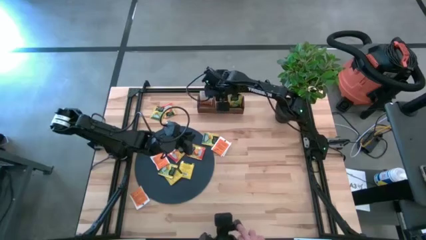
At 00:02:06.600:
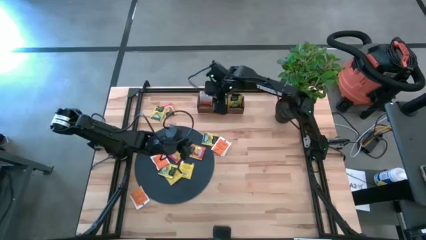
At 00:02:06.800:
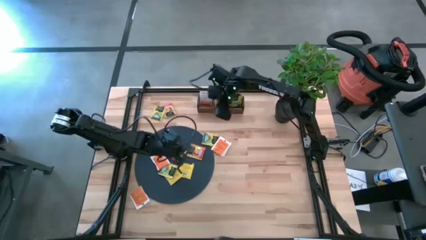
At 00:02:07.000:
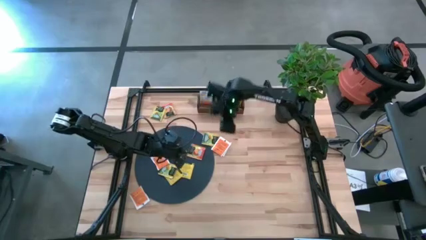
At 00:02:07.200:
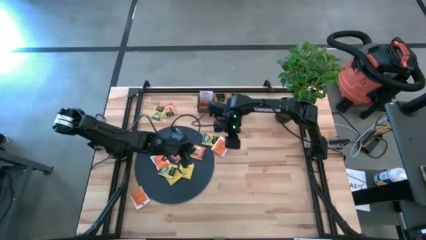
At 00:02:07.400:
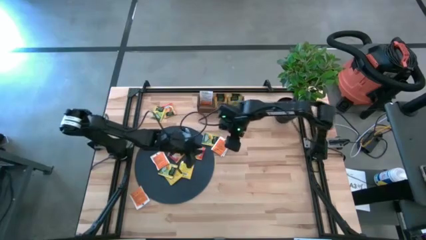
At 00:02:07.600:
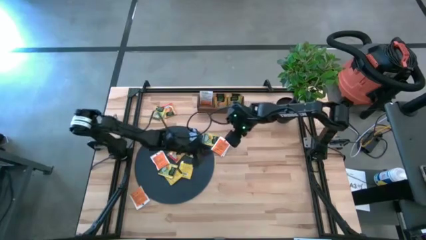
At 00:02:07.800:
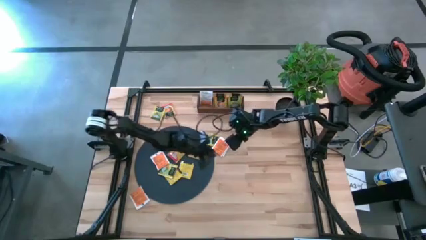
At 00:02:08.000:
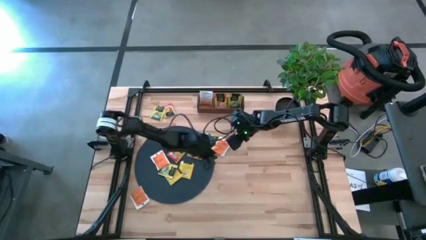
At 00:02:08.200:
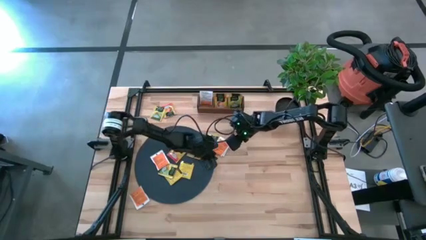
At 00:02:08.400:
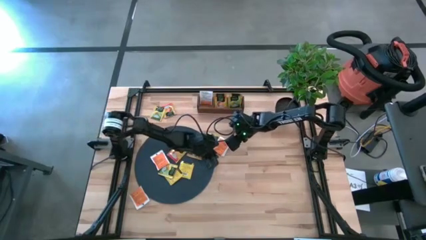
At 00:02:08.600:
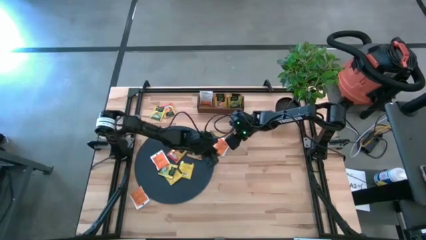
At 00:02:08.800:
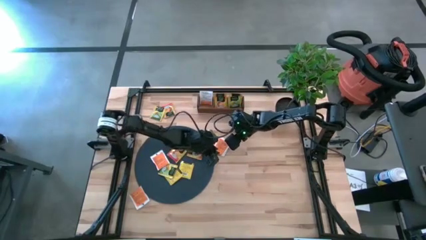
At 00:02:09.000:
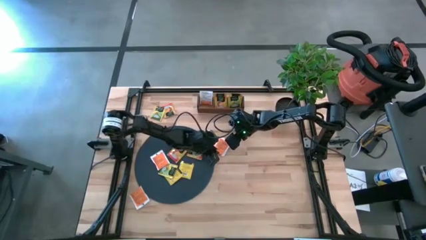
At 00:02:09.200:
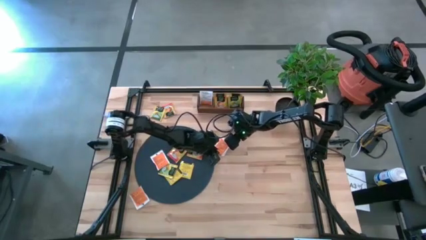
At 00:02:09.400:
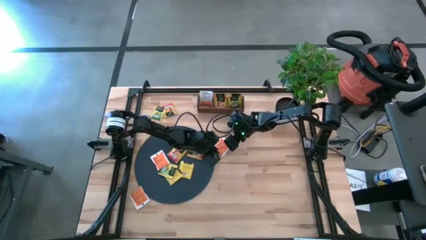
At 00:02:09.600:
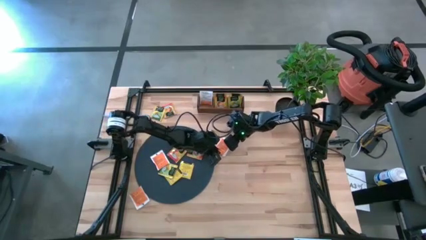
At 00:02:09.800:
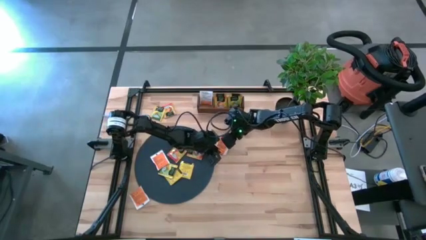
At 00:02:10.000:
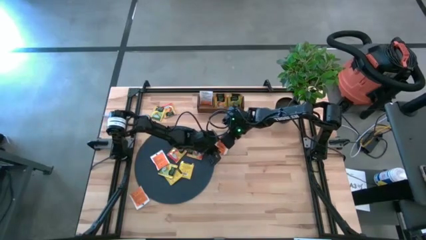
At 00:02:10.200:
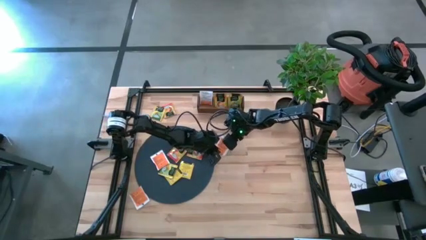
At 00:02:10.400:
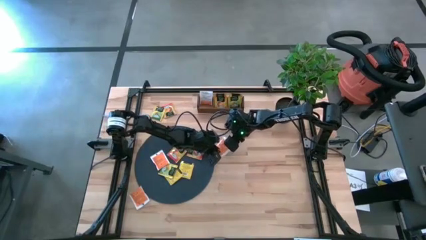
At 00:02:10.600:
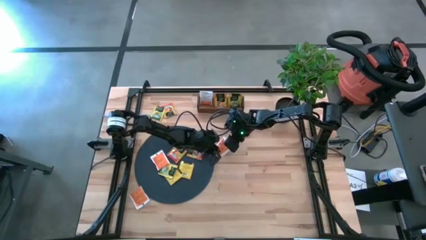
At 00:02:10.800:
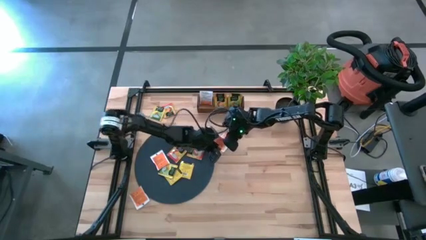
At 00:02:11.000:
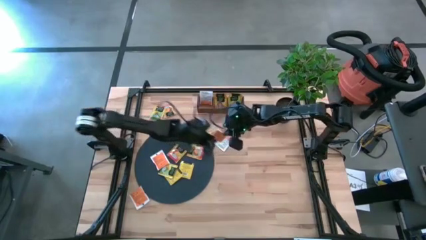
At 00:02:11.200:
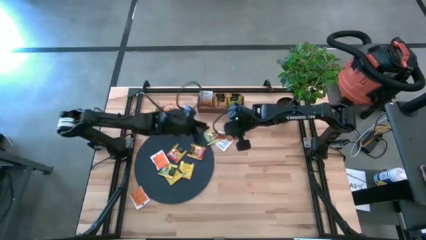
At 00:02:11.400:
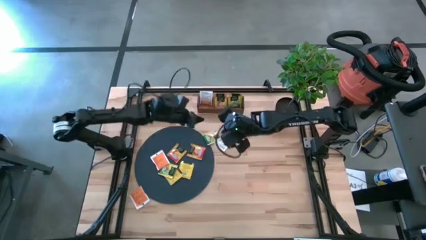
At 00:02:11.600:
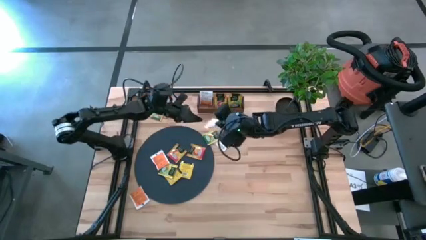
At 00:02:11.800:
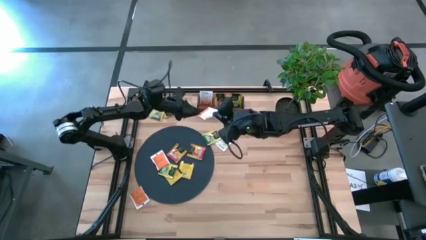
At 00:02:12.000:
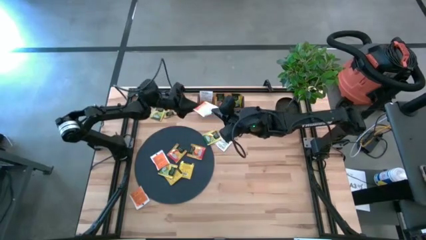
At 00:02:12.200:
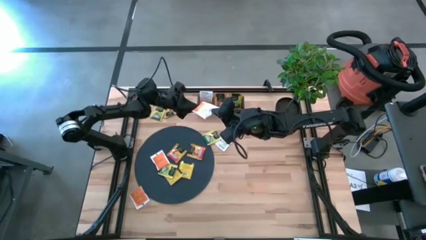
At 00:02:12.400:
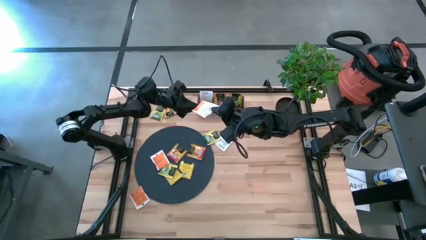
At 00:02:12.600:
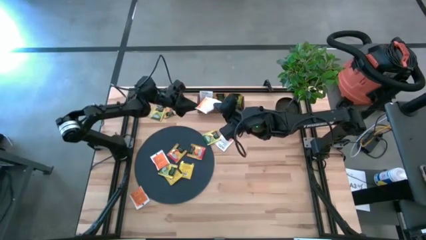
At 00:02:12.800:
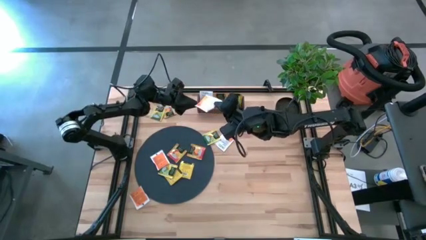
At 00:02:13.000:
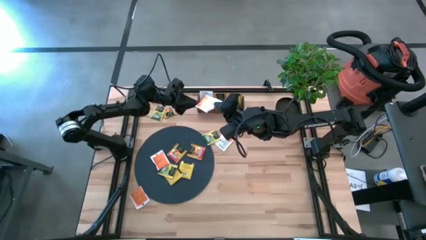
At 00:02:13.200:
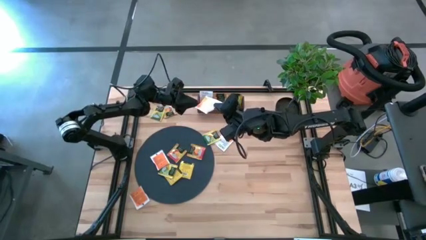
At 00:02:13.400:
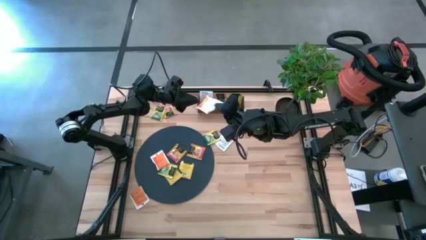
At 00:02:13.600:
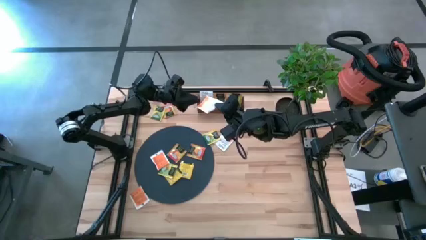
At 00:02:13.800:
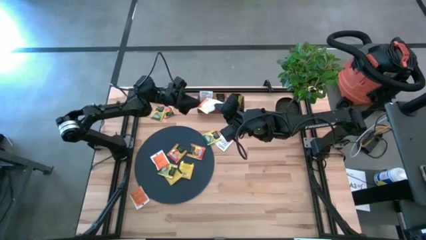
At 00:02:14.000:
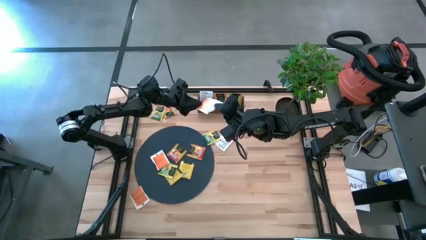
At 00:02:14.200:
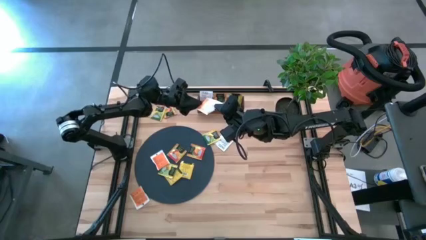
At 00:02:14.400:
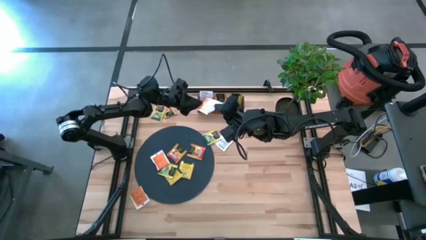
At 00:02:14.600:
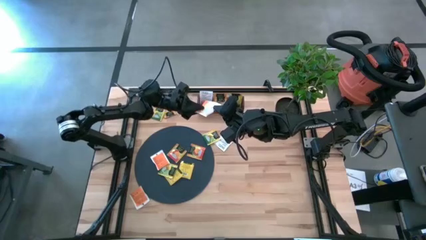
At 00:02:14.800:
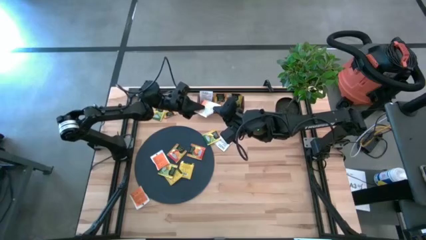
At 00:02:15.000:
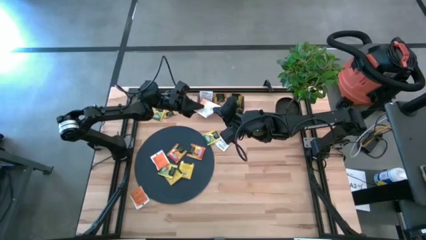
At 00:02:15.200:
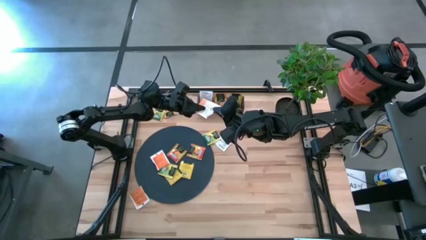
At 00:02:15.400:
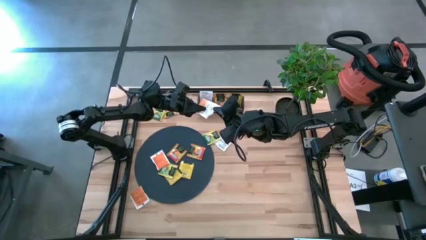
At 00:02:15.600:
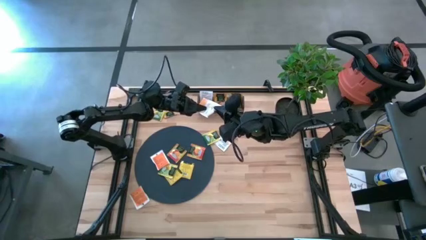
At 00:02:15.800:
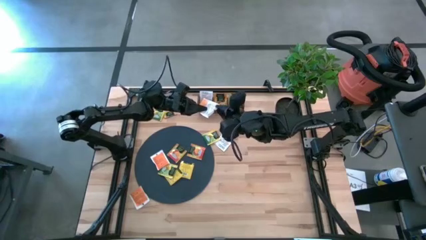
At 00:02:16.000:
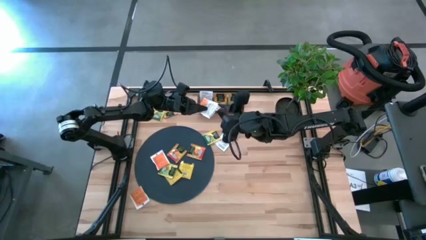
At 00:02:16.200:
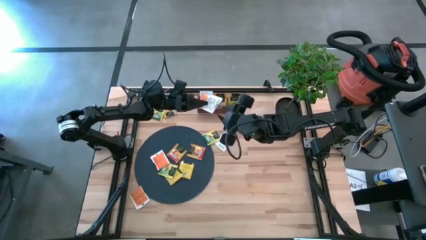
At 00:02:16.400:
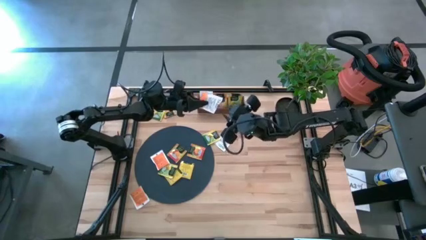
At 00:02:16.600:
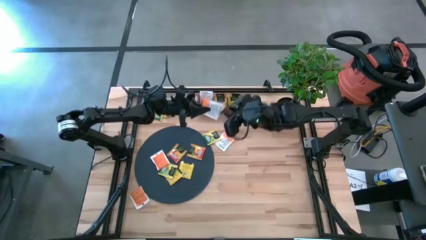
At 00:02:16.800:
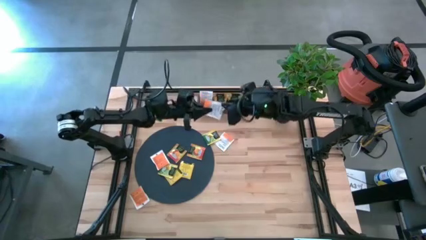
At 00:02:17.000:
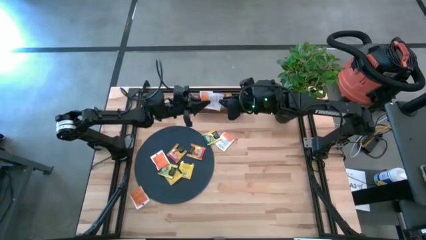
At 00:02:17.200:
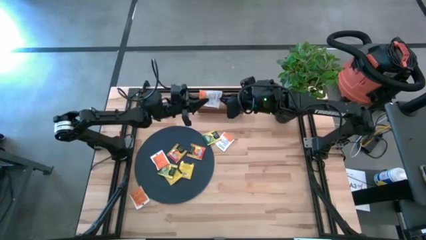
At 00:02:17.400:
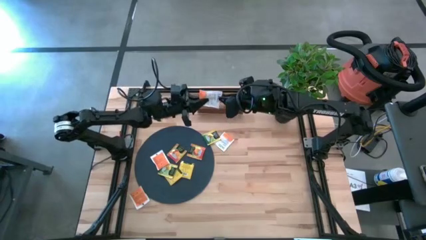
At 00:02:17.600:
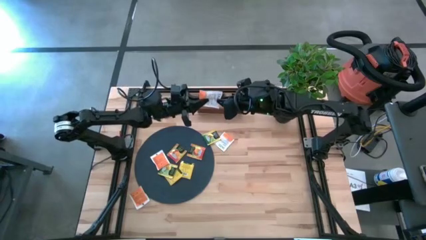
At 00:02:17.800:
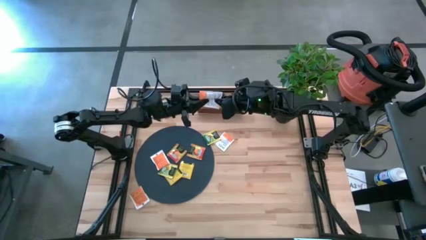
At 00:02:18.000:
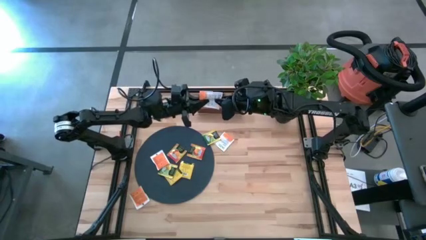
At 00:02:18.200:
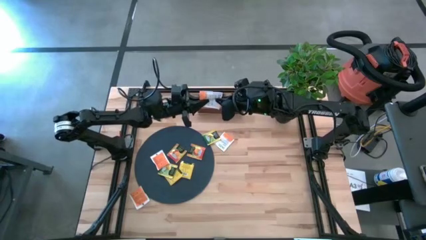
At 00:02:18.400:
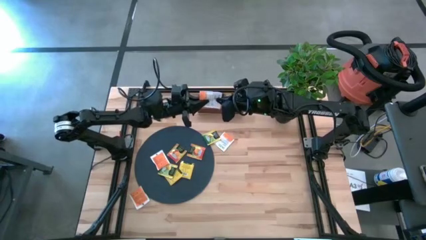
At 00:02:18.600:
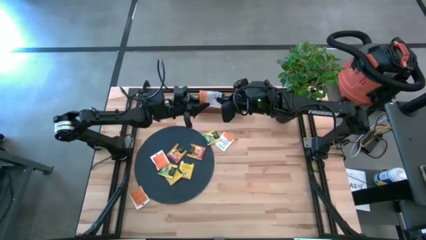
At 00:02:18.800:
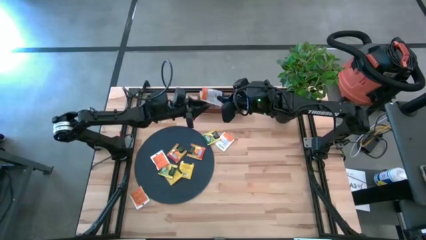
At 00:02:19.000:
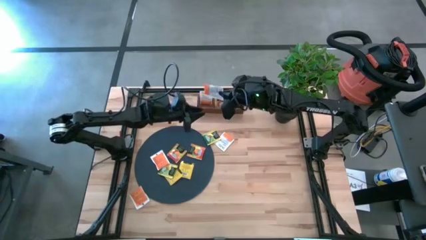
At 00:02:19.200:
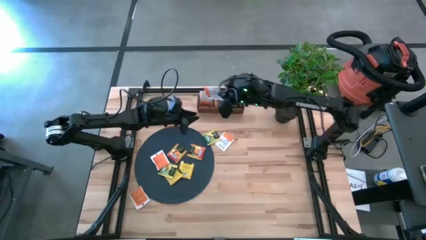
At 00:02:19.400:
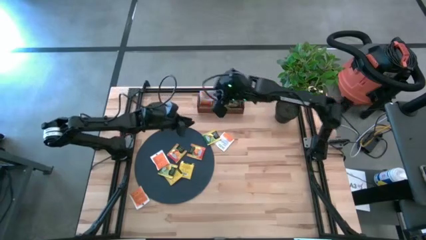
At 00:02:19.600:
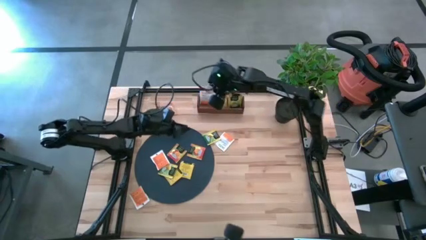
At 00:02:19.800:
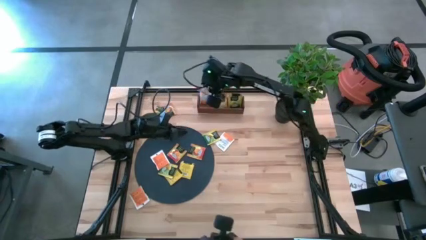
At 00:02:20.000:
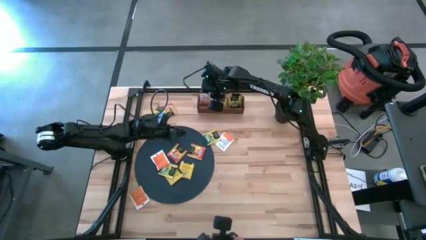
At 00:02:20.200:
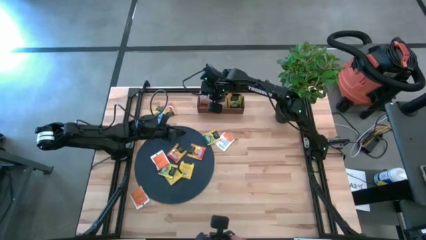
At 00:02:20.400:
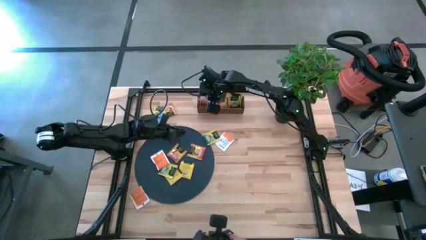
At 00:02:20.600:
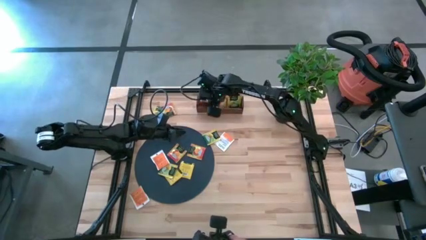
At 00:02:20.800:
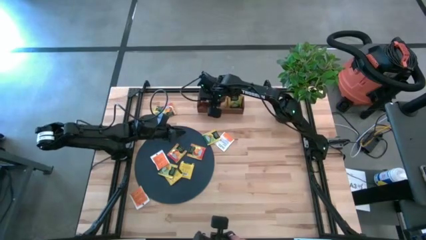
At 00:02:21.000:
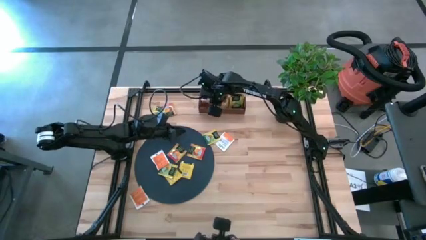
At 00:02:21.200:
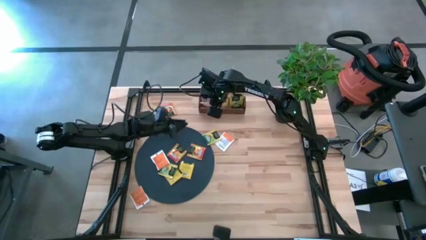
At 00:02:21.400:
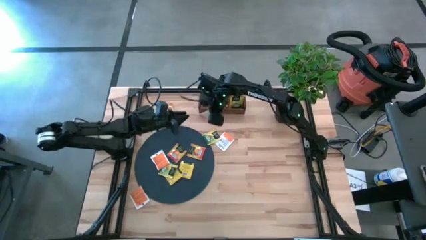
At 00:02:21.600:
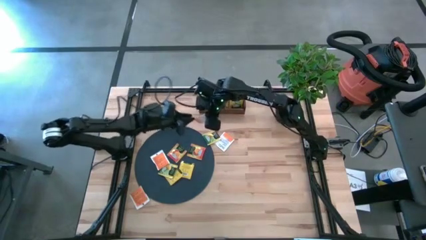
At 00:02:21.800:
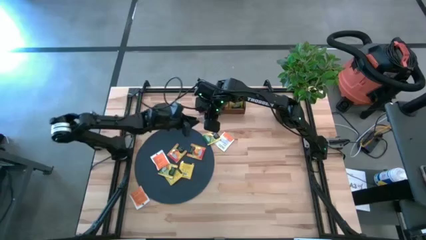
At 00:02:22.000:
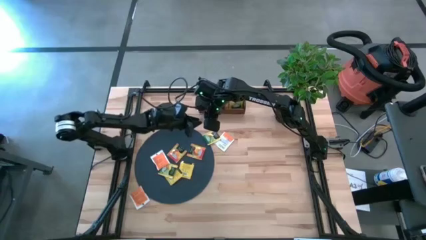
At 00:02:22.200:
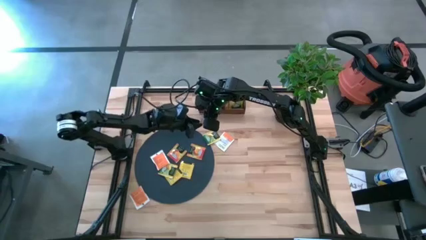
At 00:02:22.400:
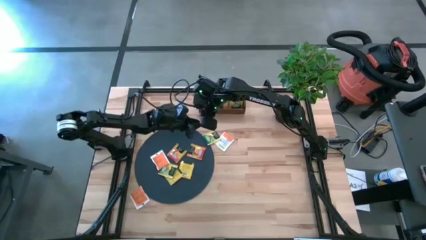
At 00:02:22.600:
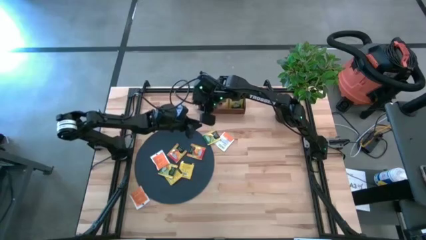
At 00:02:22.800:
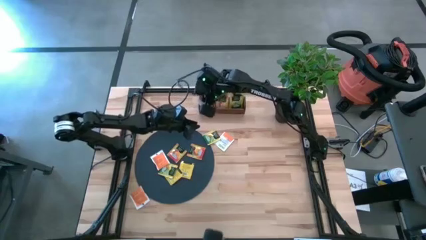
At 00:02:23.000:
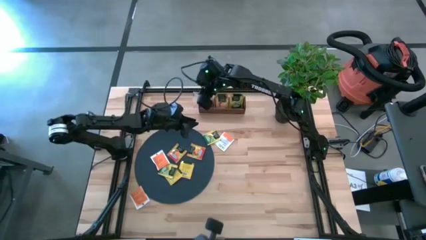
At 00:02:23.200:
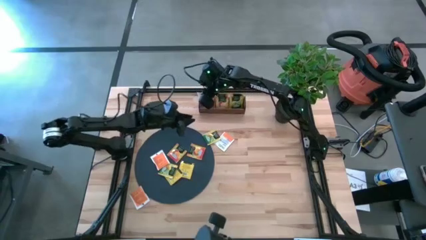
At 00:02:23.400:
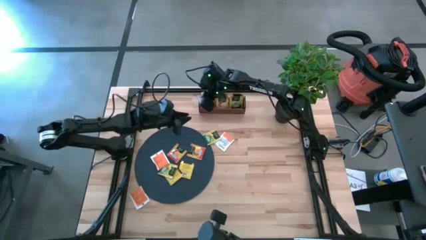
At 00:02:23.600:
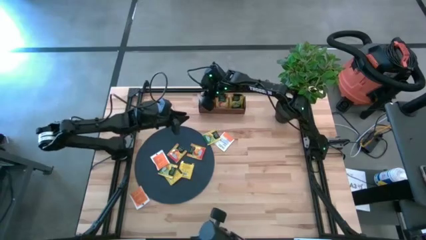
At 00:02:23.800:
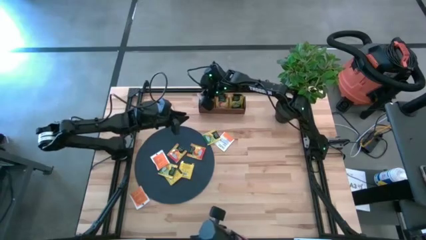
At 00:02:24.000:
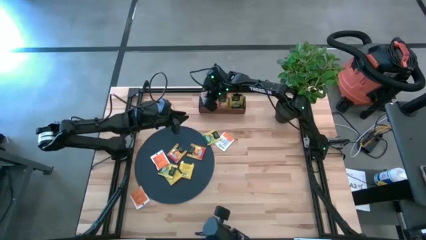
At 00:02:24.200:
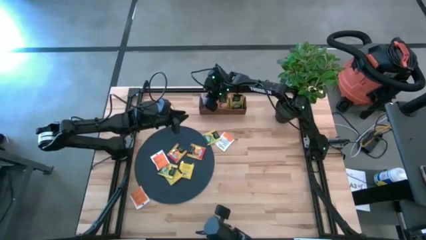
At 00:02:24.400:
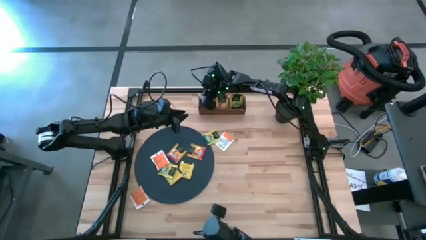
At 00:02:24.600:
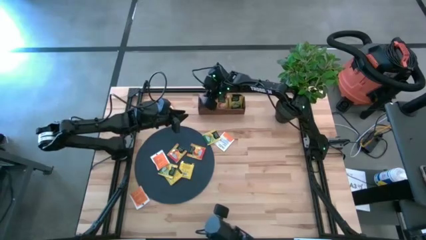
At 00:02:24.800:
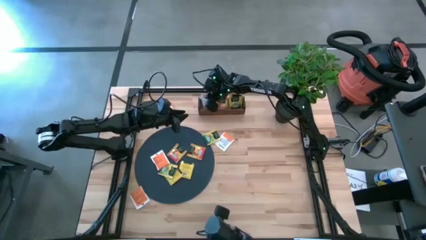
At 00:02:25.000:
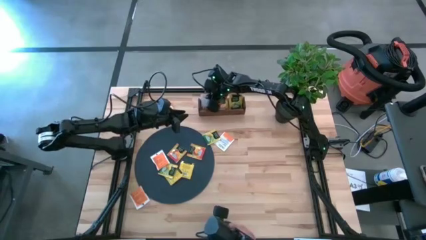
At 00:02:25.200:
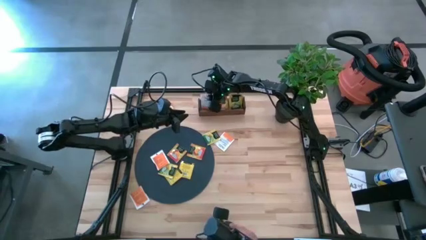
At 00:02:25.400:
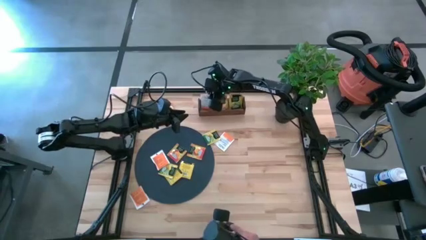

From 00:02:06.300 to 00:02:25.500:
Task: Pick & Place Tea
Put the orange tea bag into the left section of the wooden organizer
